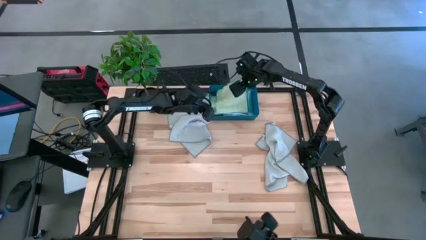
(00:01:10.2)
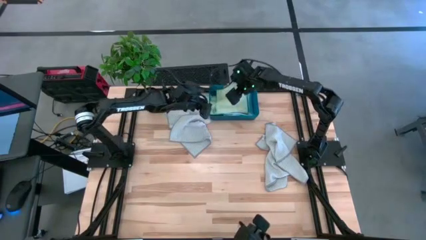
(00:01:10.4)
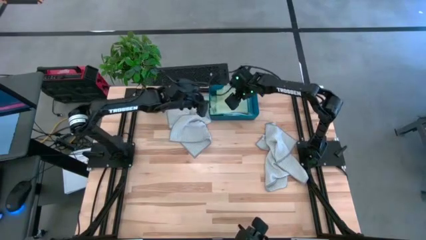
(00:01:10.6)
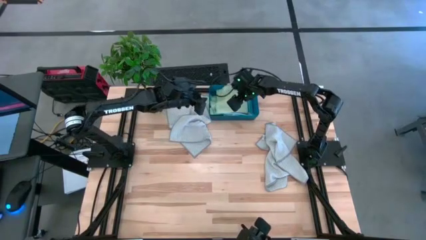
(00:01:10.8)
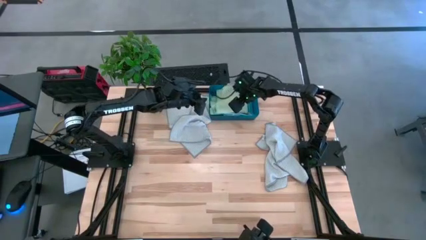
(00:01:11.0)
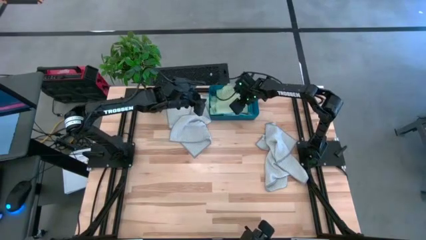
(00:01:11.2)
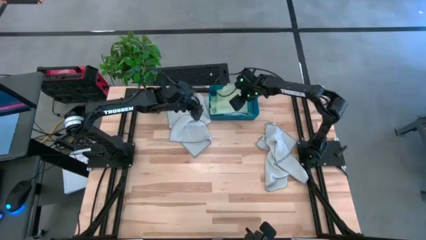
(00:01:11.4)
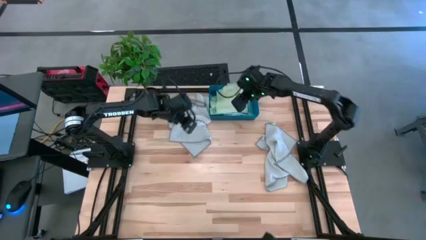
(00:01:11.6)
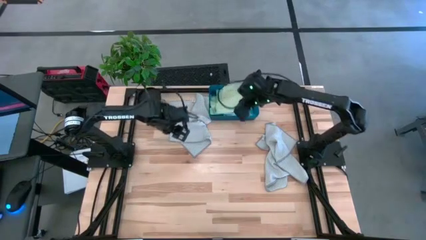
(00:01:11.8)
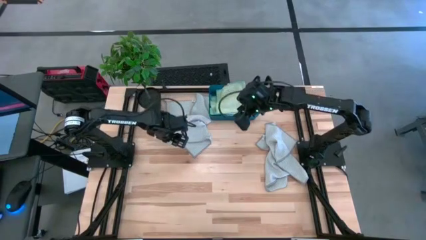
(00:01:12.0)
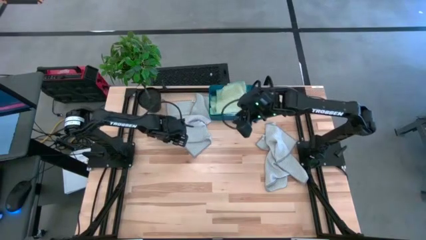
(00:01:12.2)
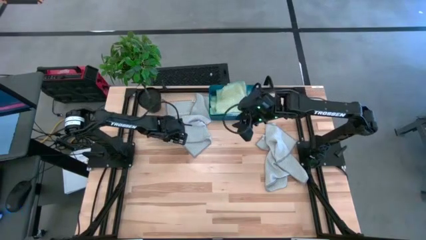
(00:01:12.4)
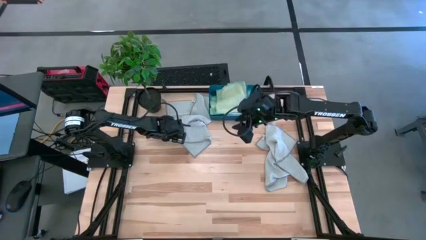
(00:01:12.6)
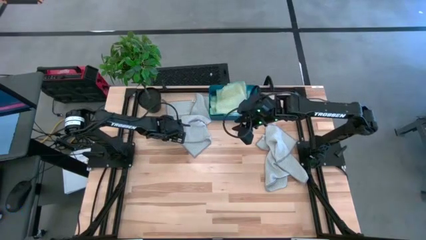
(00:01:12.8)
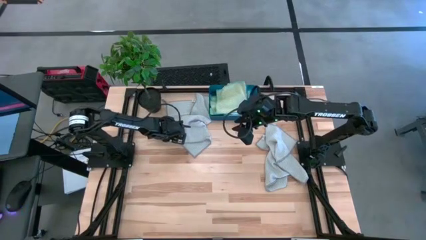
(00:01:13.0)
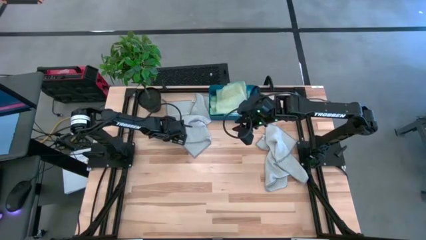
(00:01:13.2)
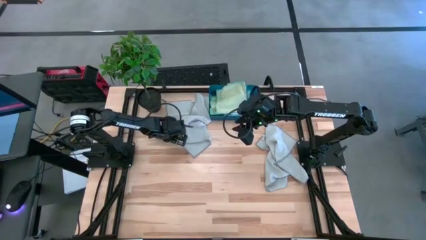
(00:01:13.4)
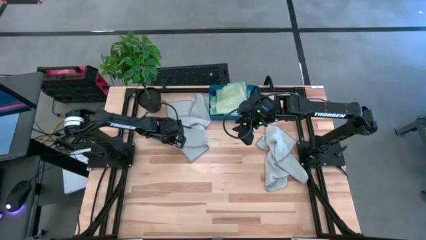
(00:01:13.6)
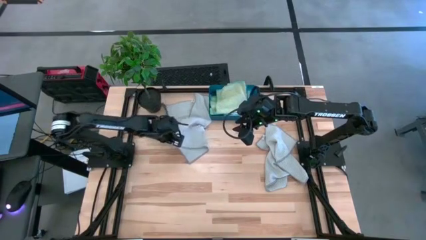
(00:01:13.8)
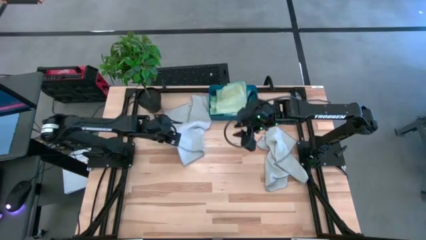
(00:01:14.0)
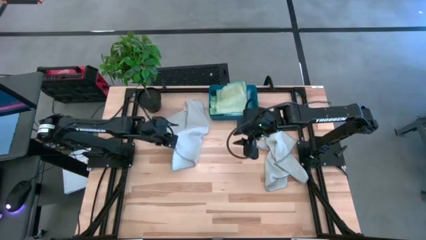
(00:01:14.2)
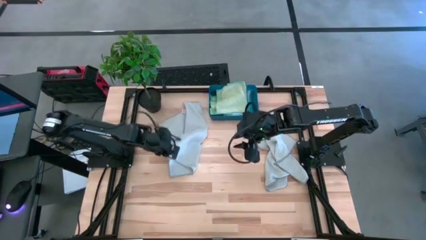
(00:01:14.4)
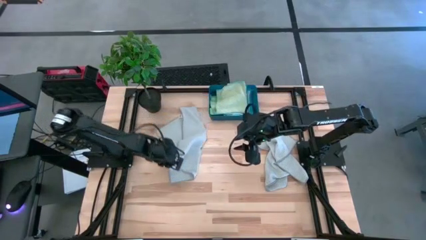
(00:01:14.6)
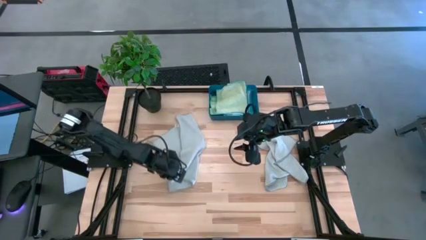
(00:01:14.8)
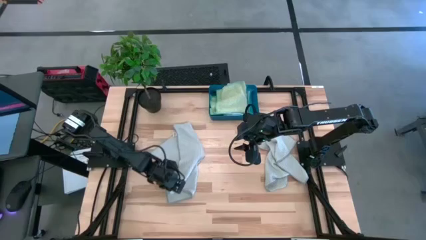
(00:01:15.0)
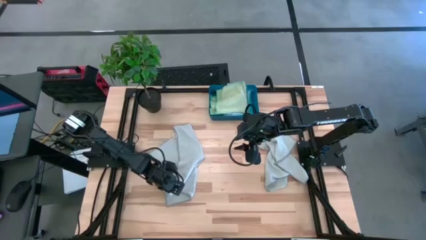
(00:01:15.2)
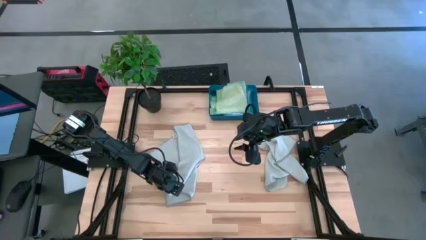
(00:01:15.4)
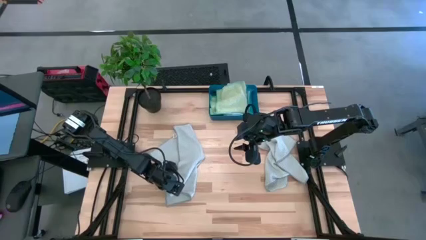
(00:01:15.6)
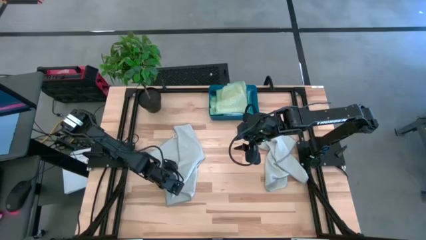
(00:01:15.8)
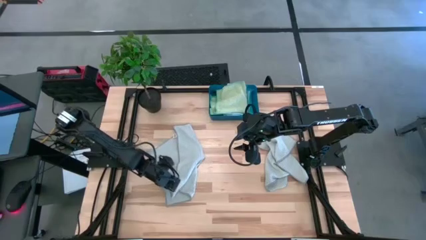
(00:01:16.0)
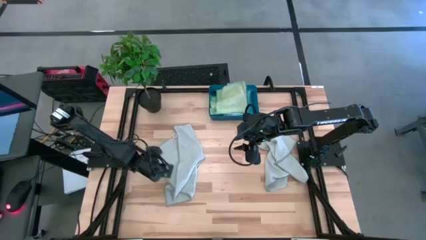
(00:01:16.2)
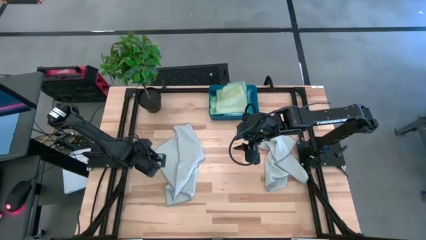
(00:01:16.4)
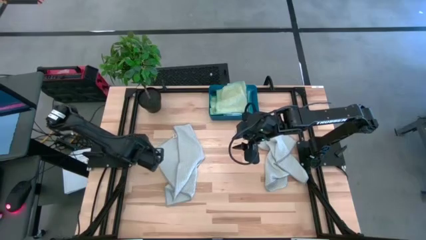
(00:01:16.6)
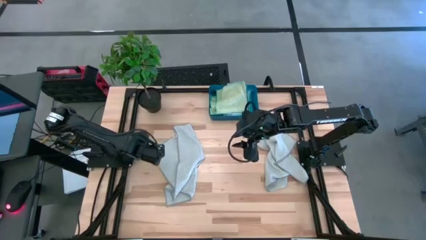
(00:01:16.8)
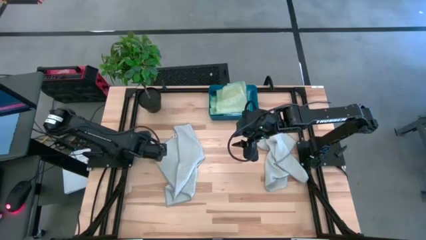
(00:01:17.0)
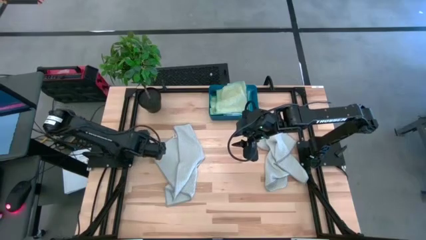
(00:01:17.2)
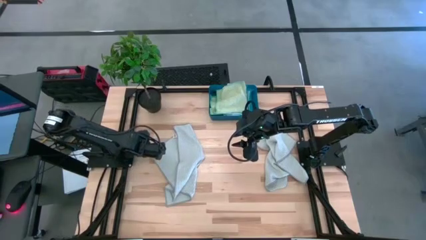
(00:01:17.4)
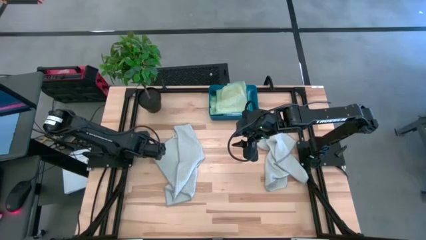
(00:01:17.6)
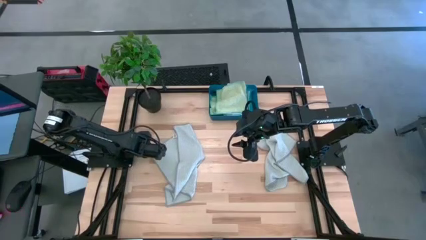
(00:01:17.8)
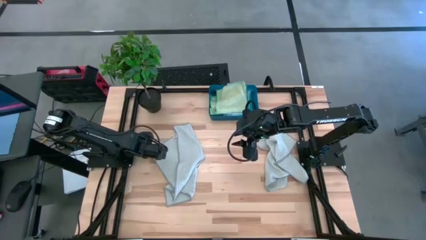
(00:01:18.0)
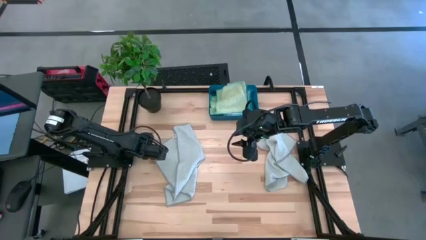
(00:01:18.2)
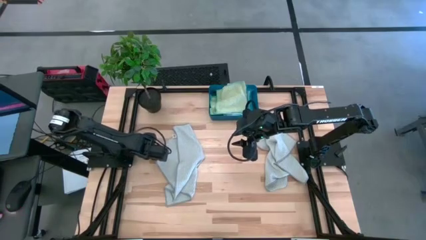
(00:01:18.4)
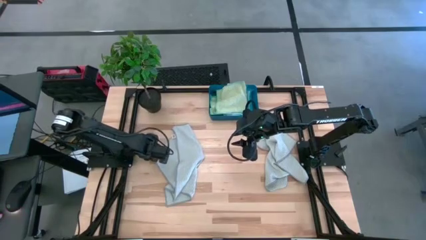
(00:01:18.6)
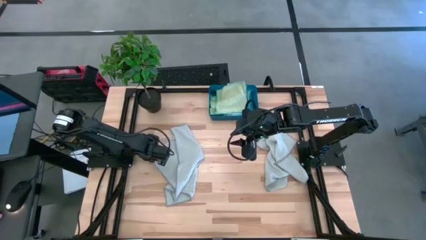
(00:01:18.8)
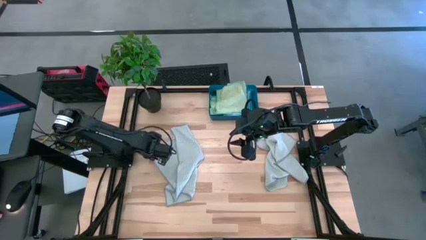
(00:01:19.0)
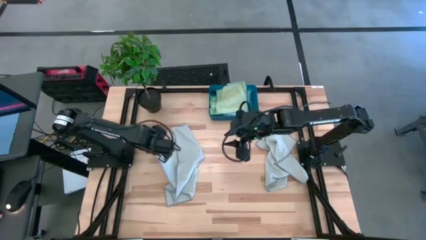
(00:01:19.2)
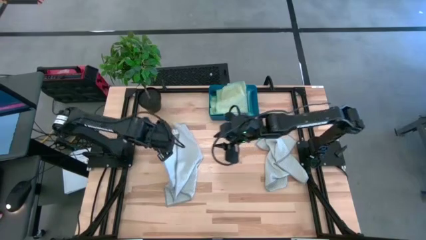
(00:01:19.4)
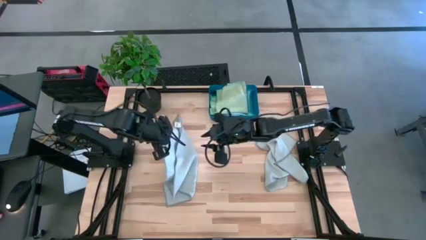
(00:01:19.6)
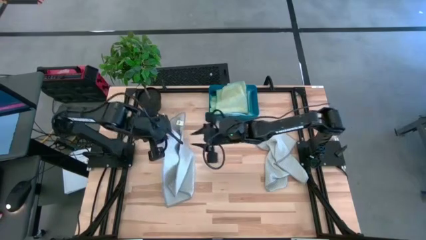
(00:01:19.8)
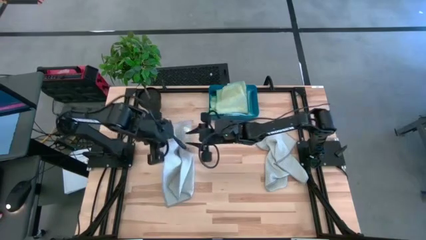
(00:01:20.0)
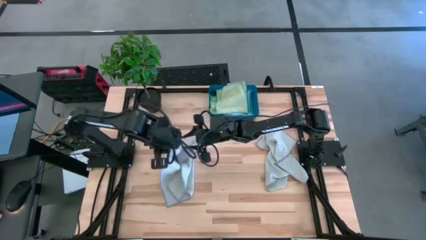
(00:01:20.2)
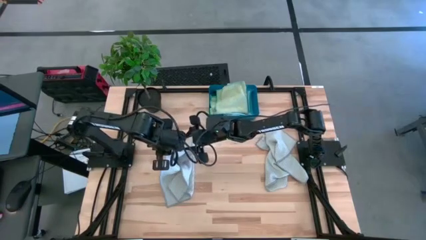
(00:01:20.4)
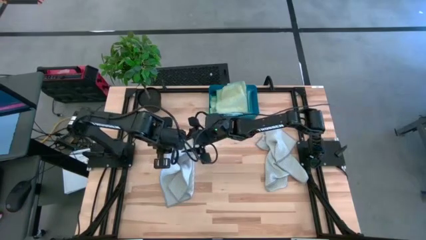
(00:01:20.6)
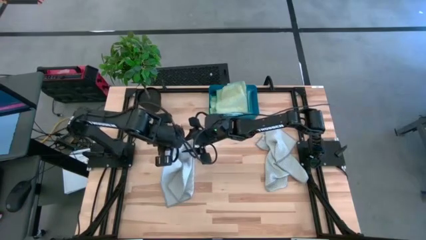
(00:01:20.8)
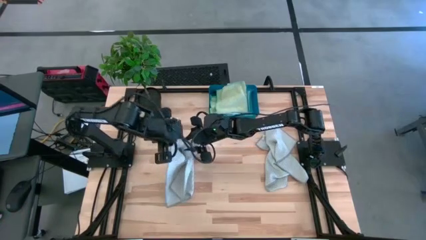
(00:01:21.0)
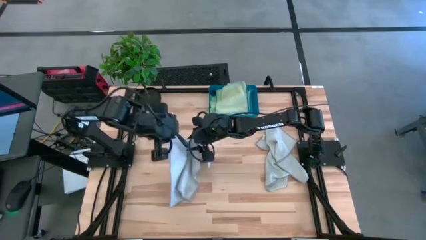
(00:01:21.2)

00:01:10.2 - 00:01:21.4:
Task: Fold microfiber towels
Fold the left gray towel

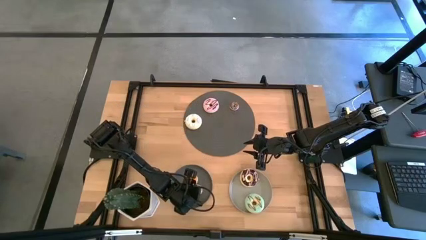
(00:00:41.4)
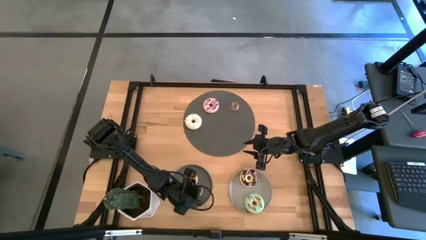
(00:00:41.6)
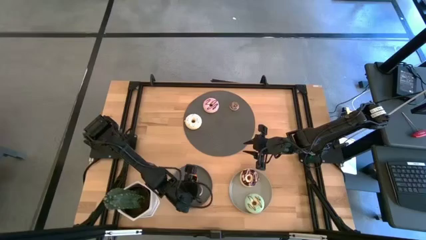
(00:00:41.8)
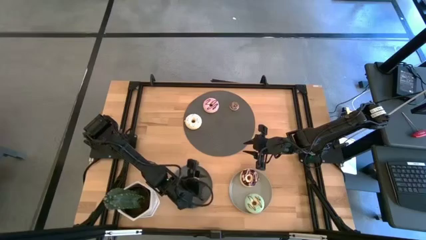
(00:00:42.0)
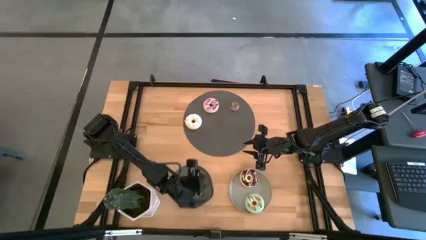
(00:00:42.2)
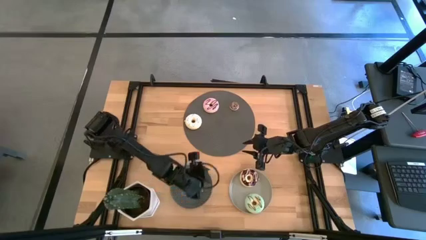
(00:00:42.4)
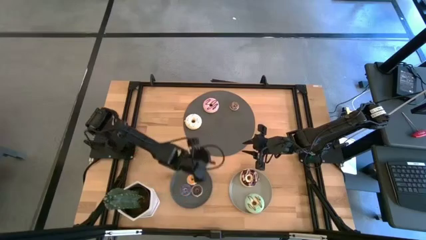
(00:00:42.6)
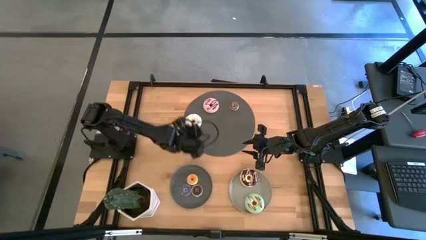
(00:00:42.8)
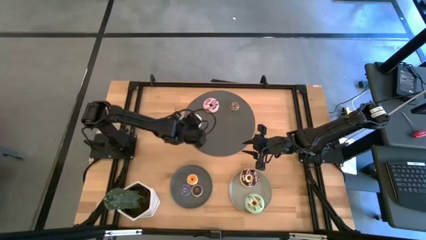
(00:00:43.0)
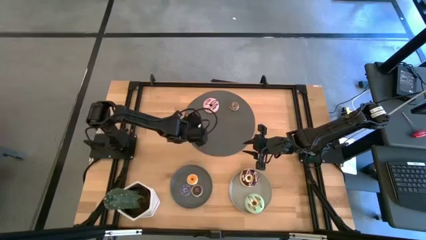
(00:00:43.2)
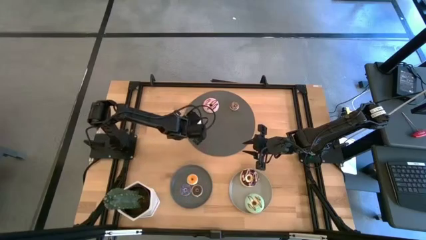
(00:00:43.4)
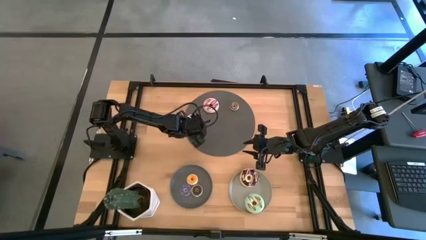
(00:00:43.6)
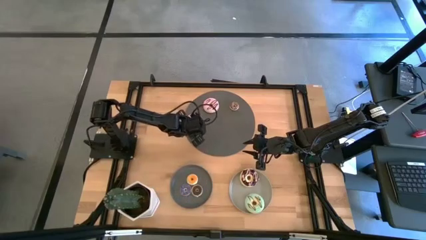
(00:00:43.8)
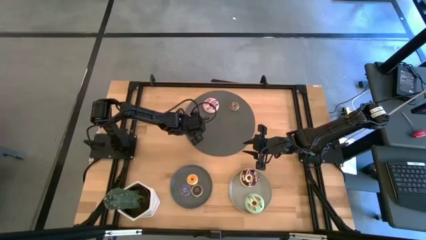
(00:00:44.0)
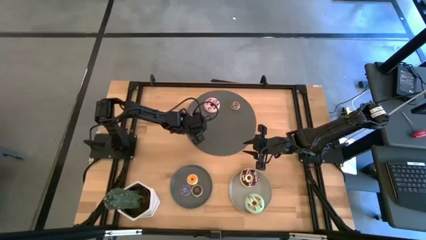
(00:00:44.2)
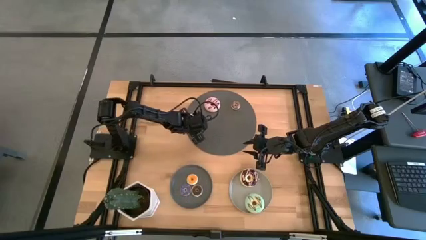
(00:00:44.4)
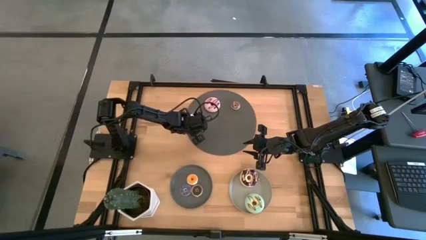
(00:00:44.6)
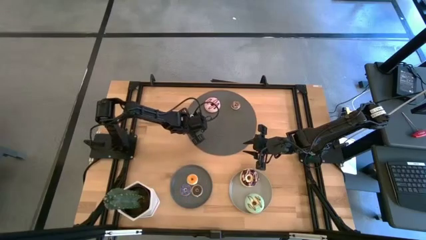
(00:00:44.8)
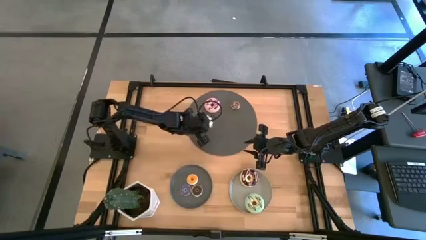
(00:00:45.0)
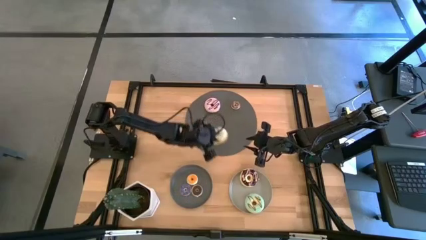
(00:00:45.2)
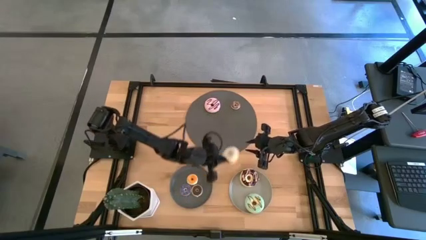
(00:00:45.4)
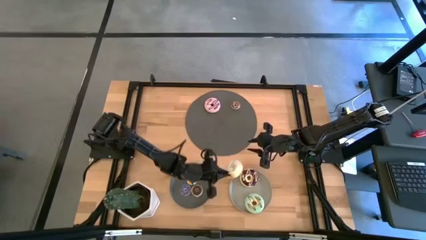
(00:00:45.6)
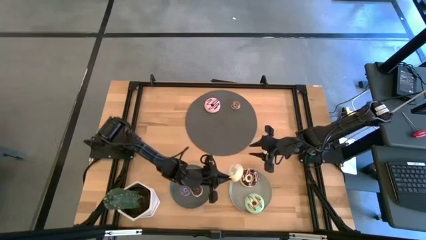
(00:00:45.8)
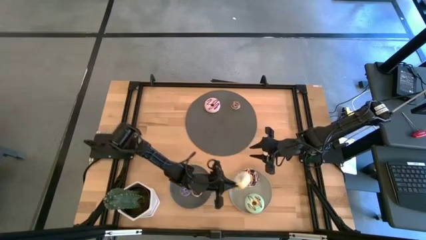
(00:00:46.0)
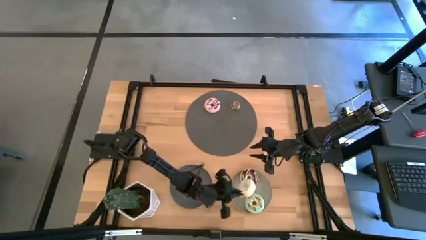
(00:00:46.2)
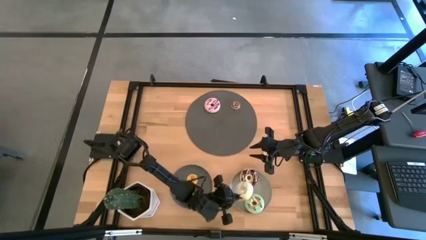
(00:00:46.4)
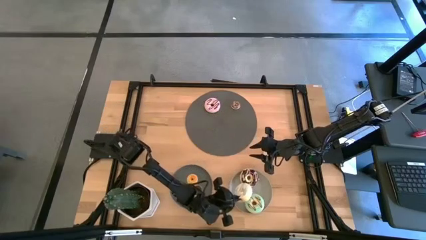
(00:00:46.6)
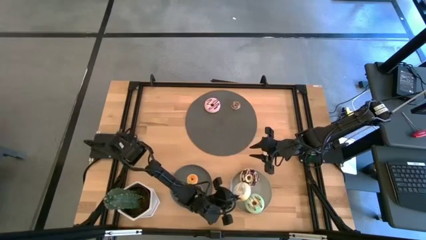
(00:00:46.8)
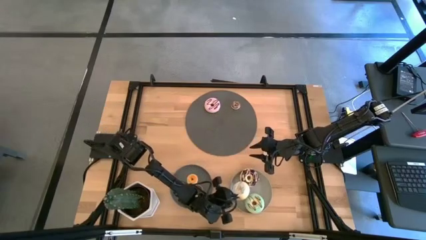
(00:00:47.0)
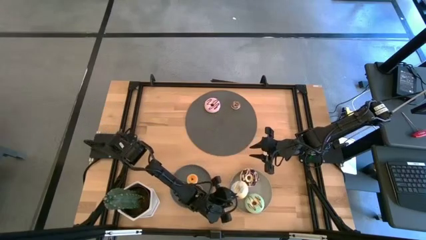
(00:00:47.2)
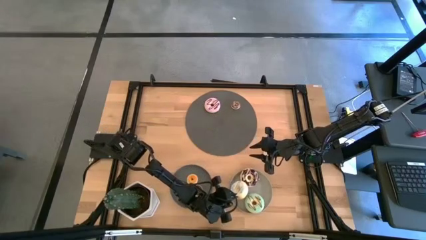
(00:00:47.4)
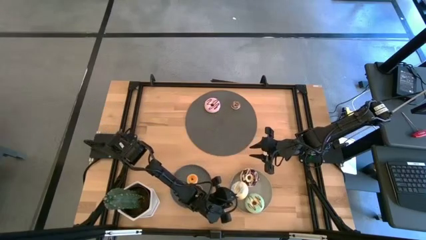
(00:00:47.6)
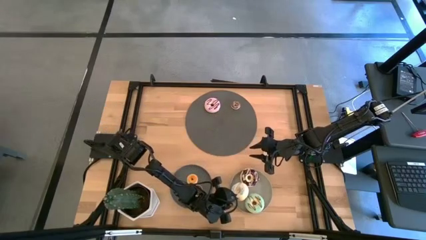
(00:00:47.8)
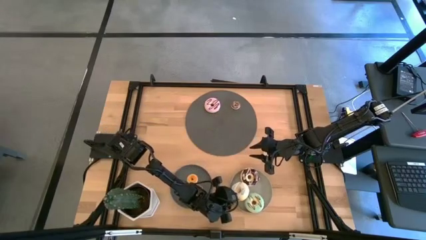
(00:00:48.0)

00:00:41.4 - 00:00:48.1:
Task: Pick & Place donuts
Put large white donut on the gray plate
